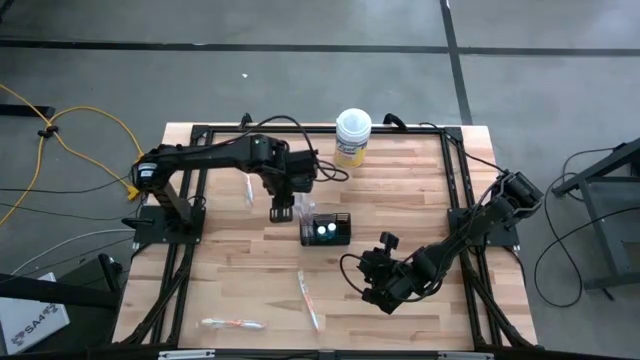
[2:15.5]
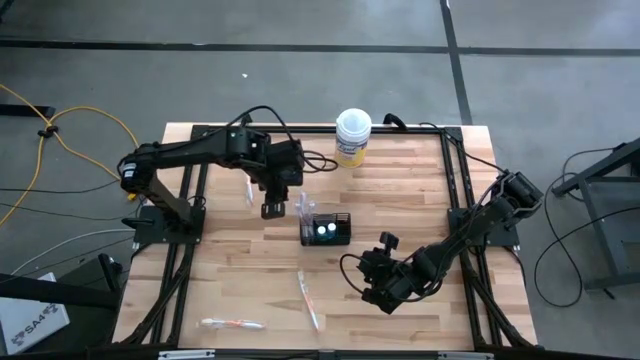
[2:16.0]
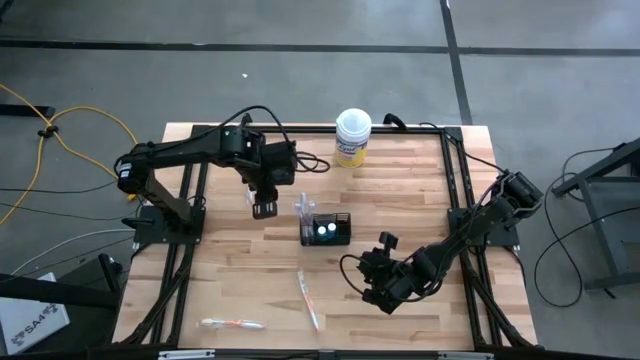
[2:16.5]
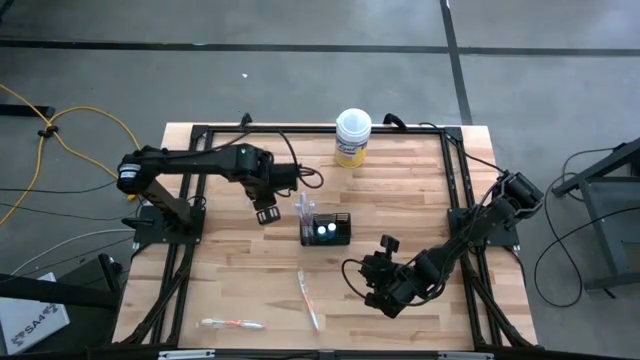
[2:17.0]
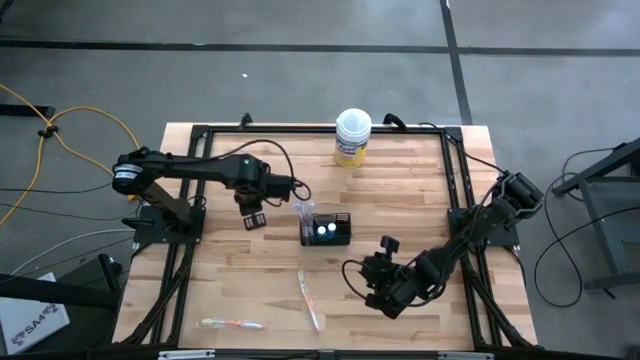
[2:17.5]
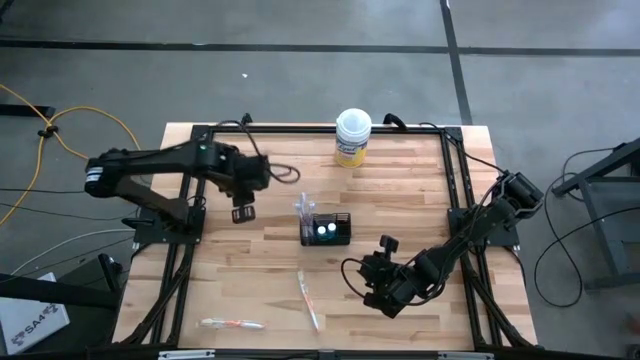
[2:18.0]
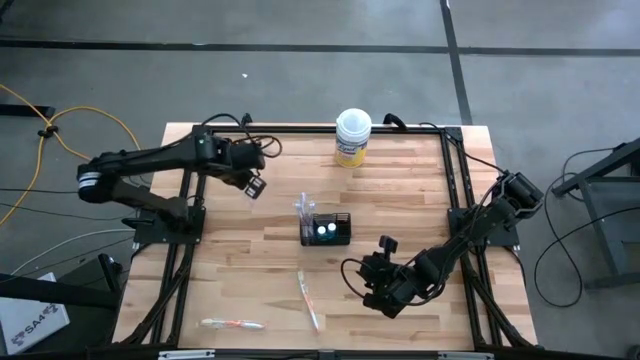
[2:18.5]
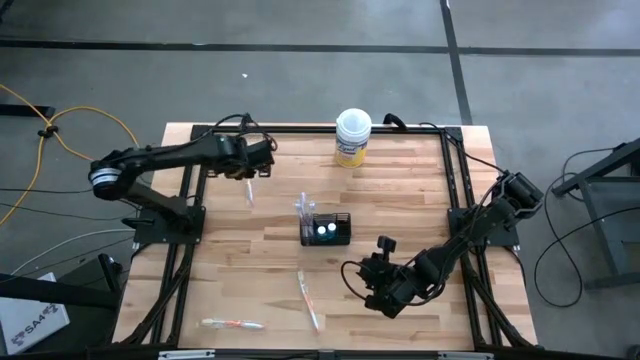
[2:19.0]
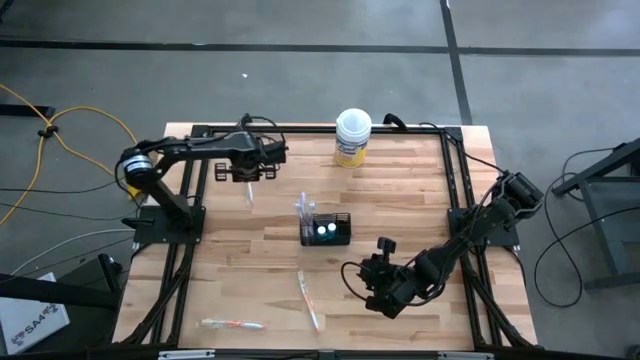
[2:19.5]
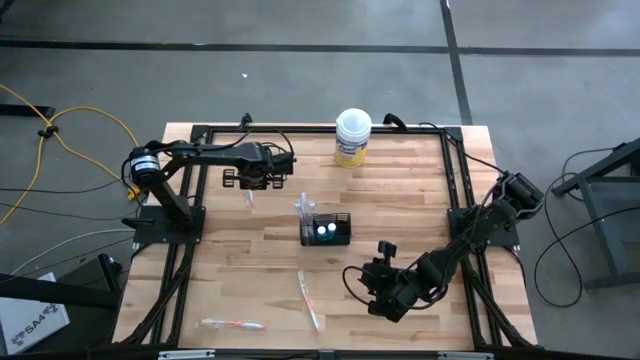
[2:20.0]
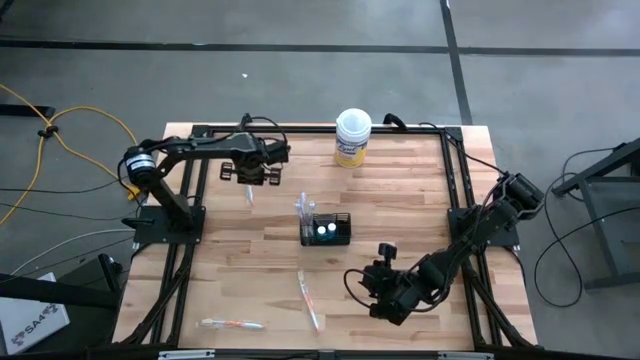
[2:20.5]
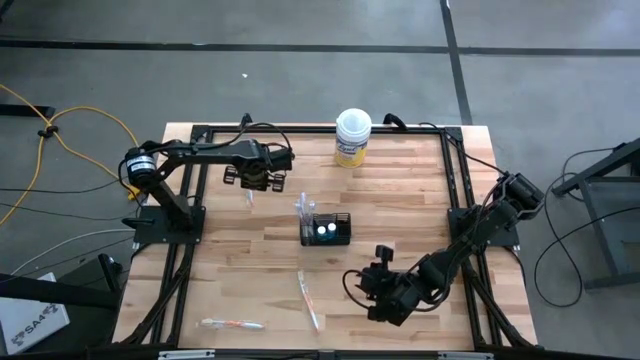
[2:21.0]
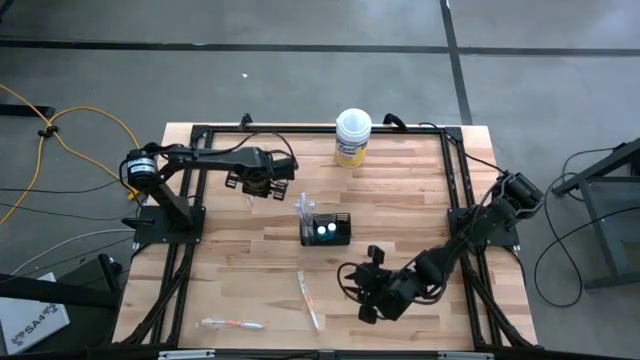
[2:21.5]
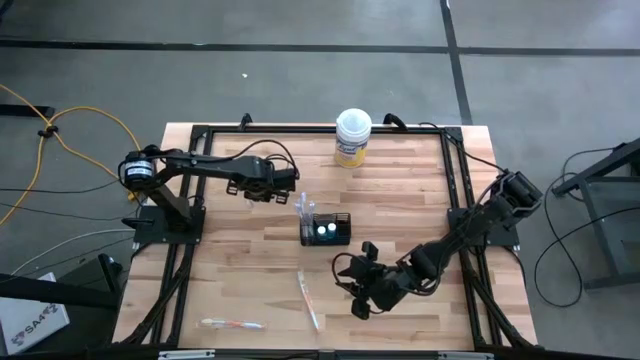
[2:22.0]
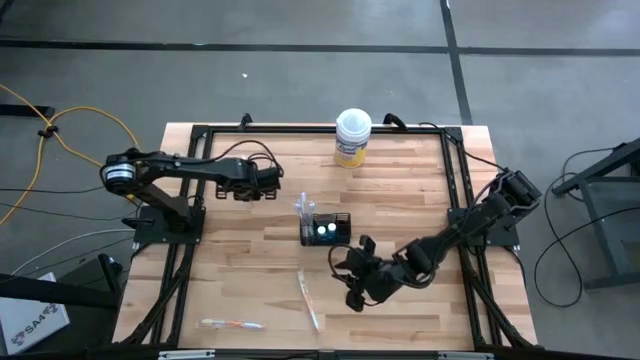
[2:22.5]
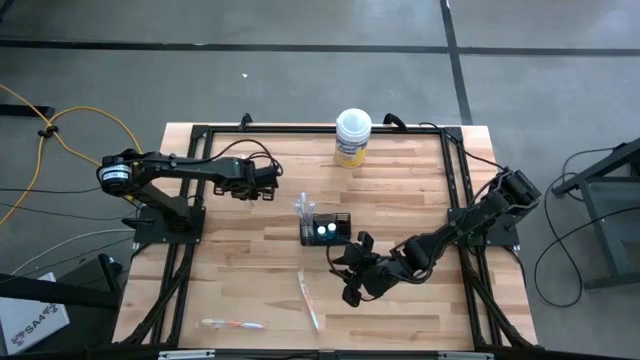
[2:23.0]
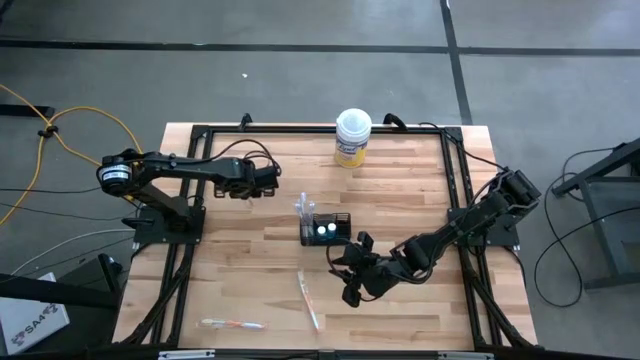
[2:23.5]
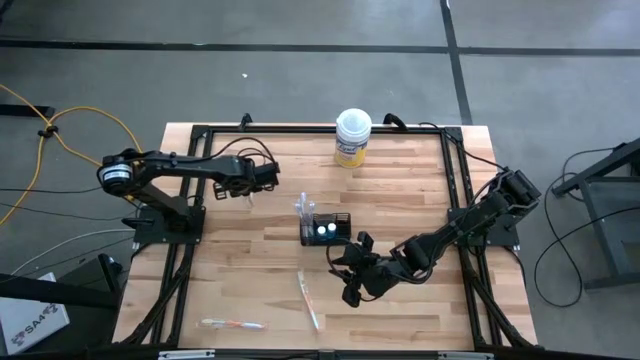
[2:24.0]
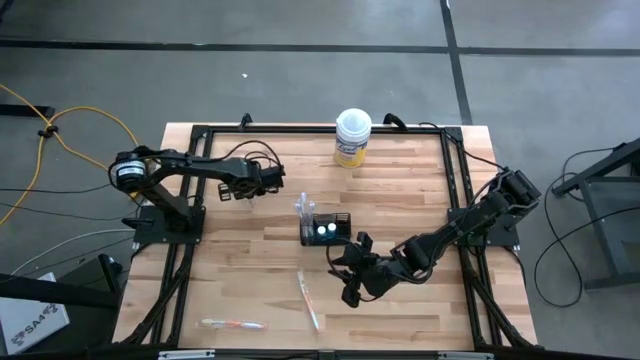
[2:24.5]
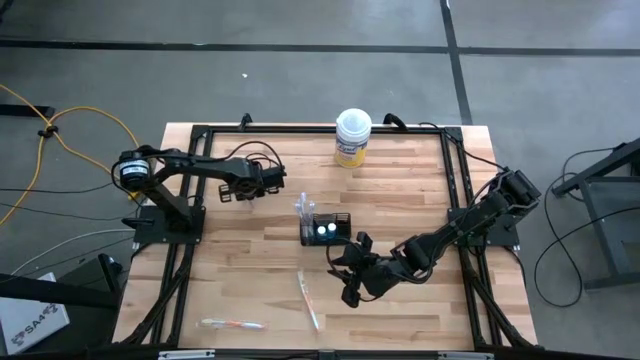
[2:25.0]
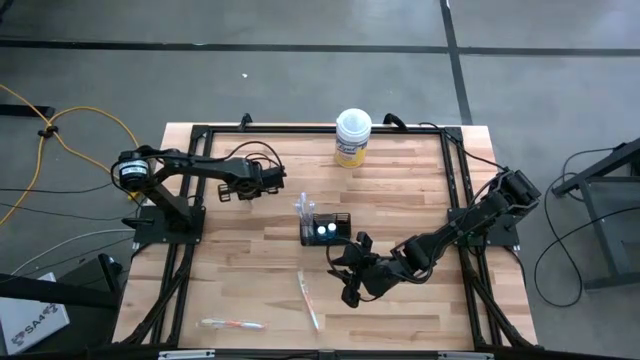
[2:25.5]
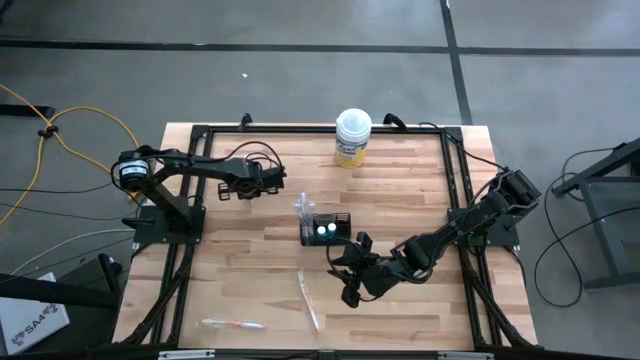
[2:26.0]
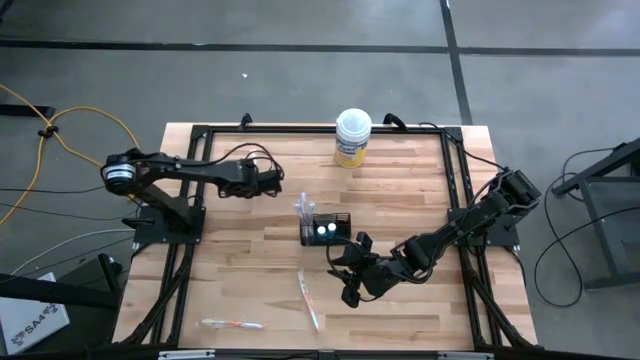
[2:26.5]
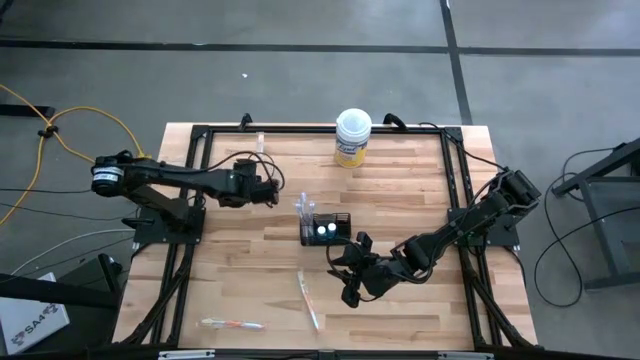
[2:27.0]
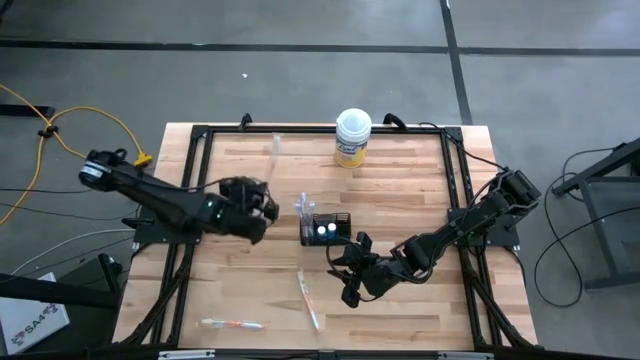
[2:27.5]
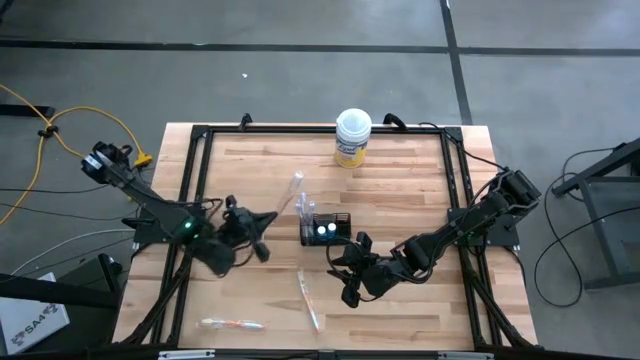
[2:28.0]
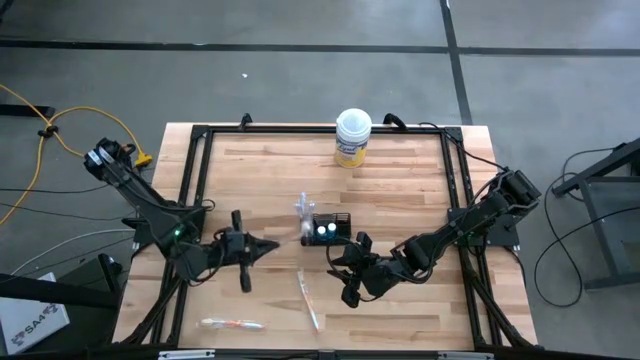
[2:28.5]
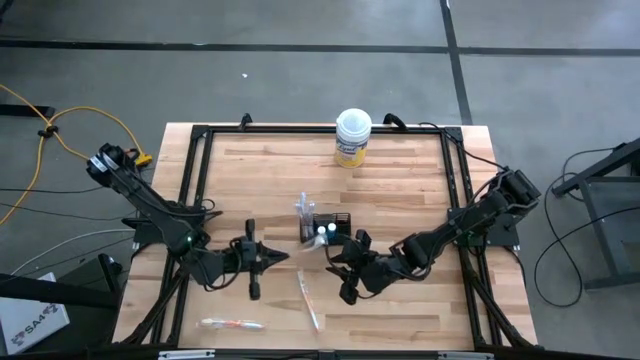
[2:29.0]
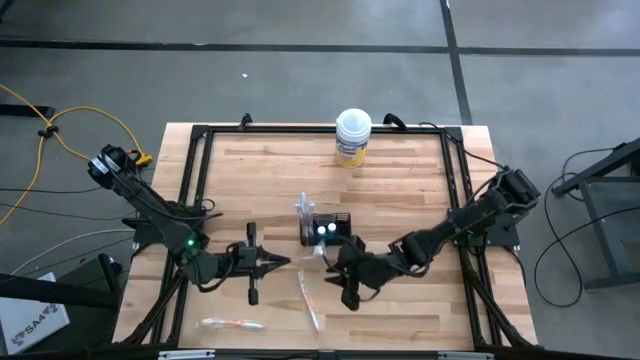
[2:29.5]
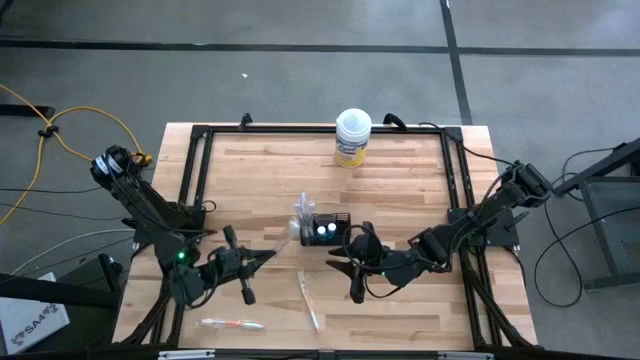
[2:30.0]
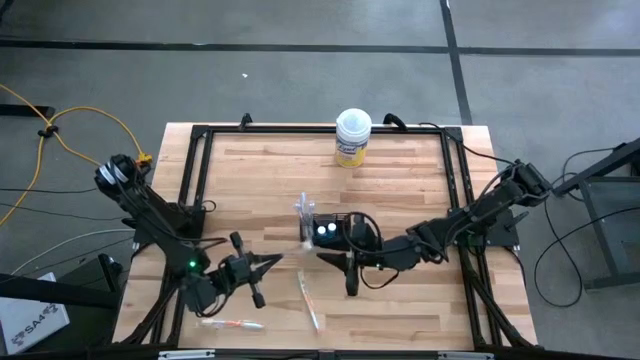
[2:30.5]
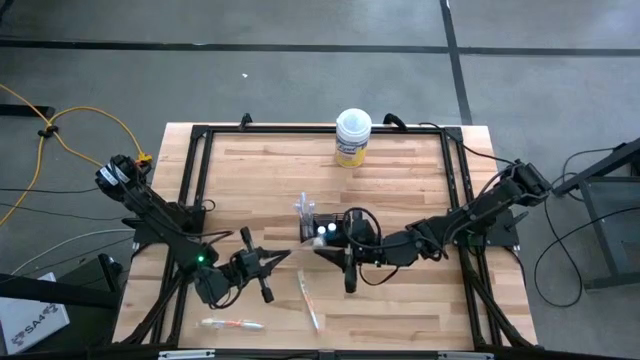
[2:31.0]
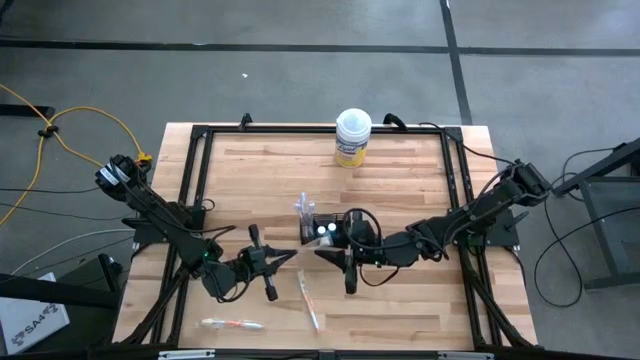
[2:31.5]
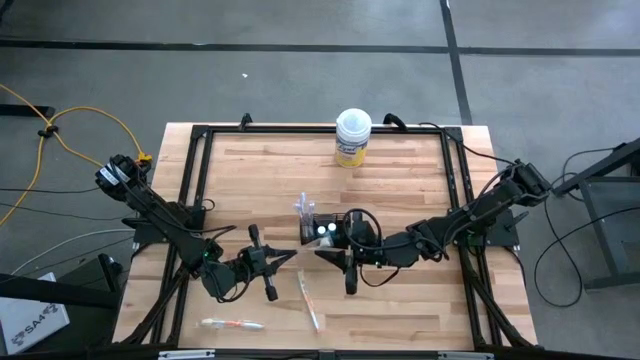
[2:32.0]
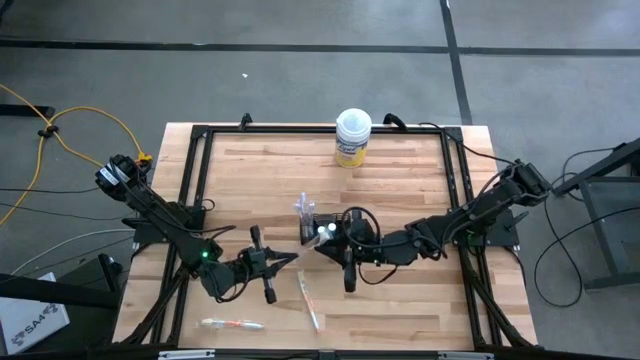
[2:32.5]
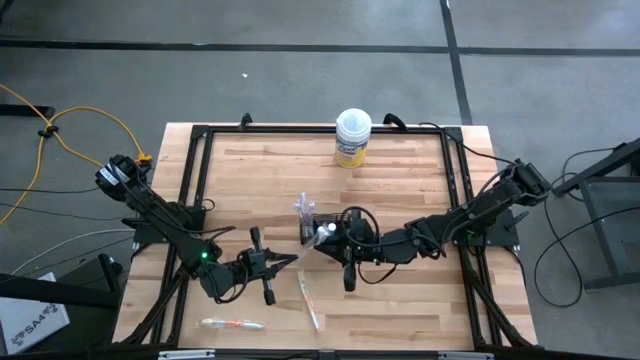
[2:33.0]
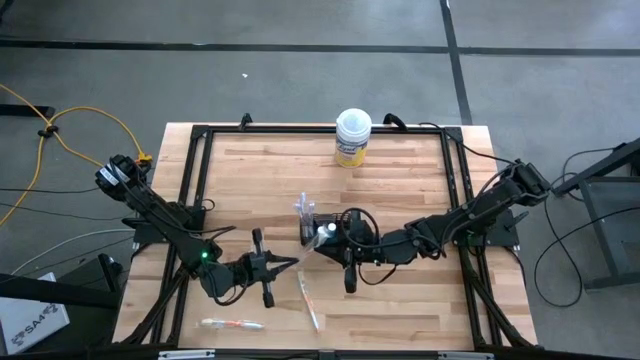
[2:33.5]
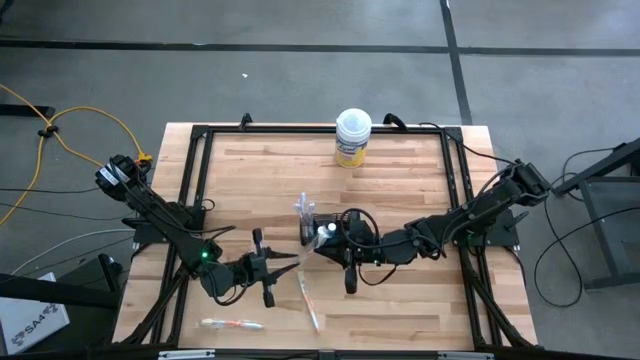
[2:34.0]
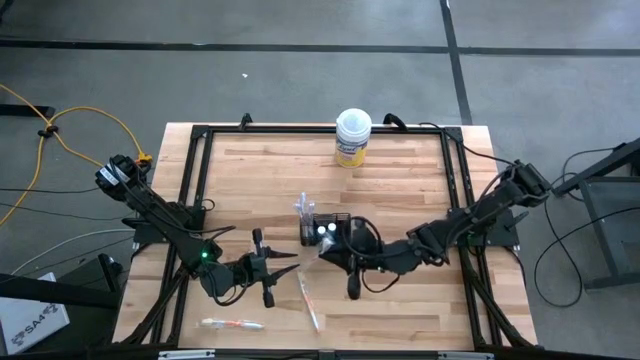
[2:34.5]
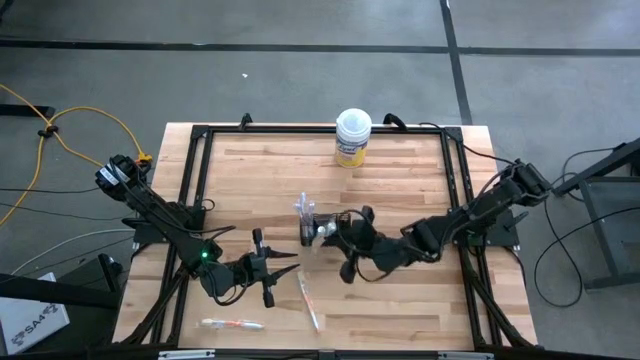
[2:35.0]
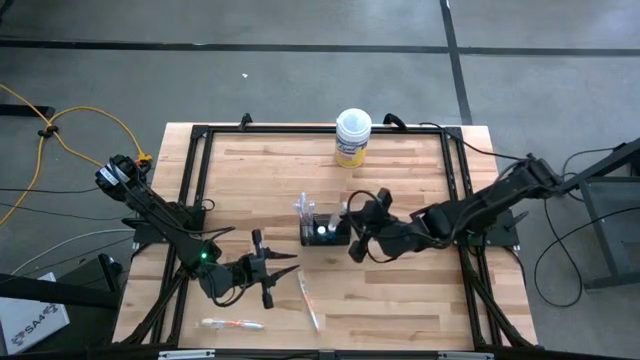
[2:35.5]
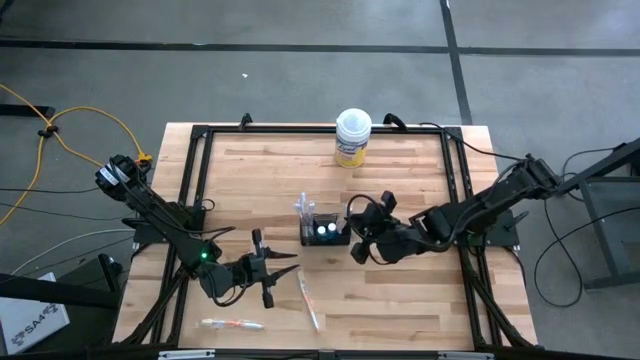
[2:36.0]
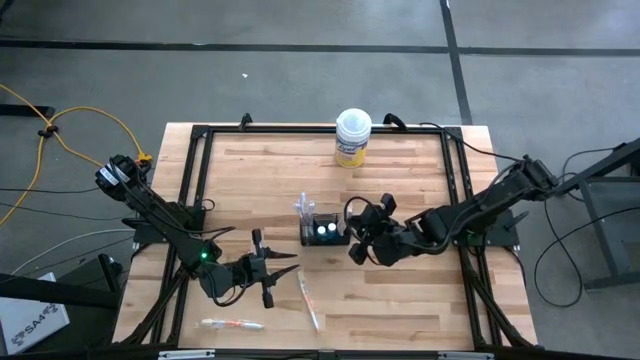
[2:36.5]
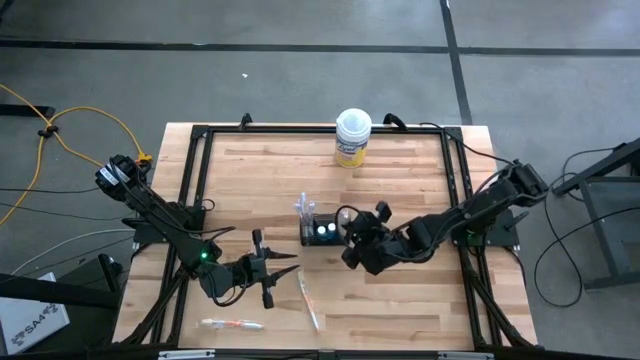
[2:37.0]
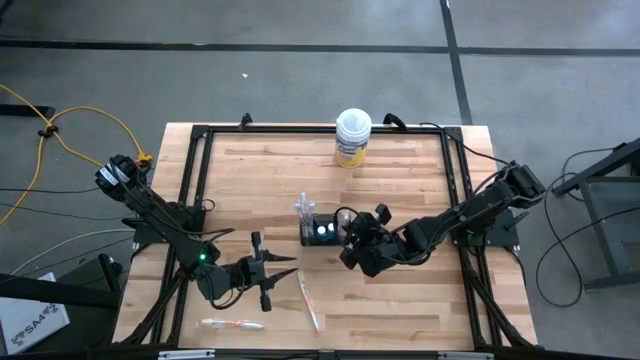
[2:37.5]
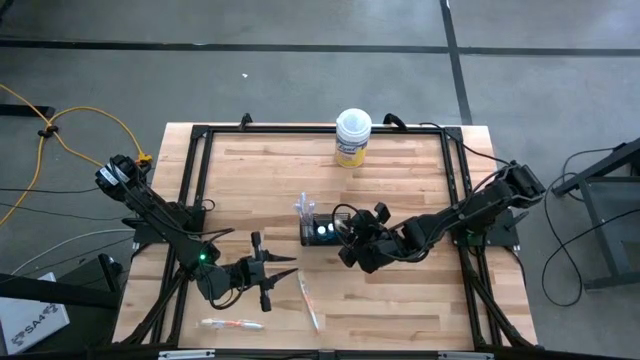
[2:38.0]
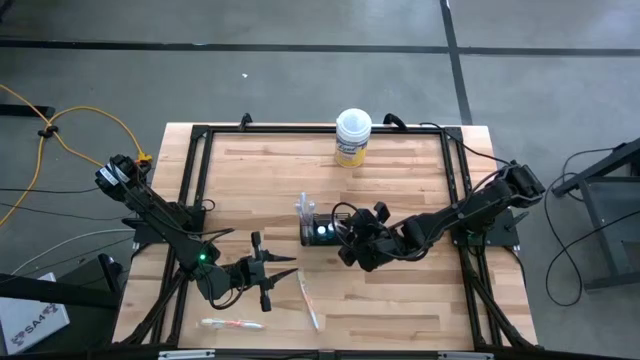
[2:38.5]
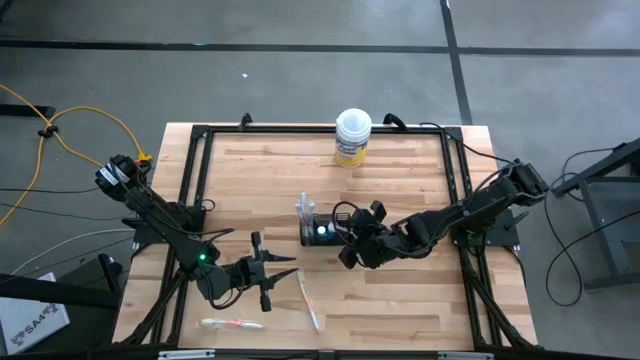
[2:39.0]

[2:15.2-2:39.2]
Task: Pick & Place toothbrushing station
Put the top orange toothbrush into the wire organizer
